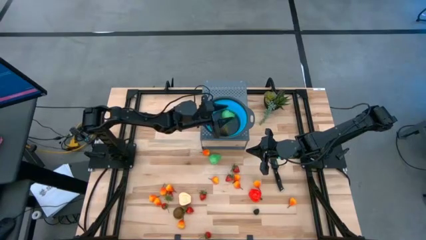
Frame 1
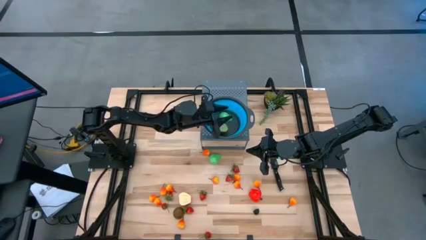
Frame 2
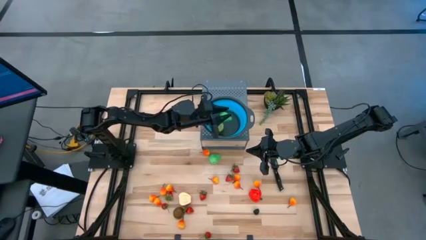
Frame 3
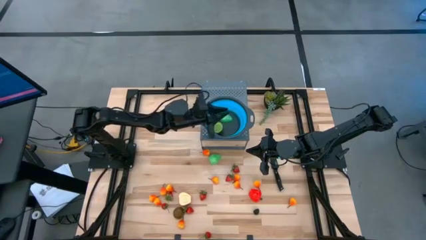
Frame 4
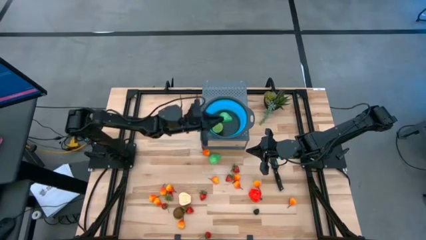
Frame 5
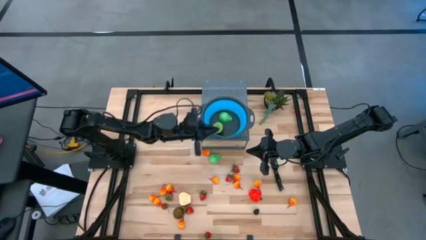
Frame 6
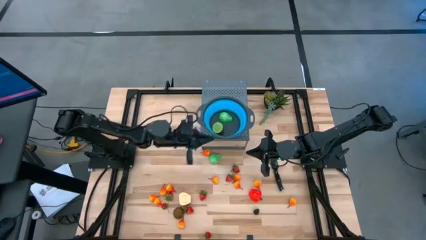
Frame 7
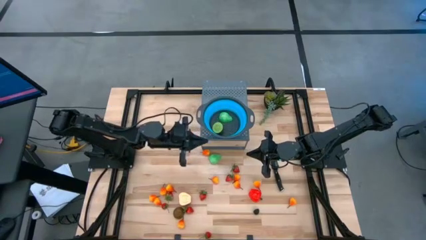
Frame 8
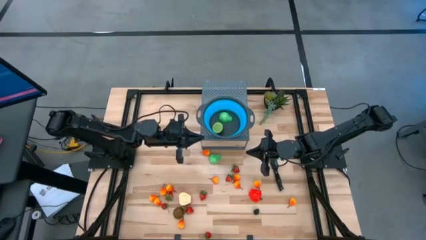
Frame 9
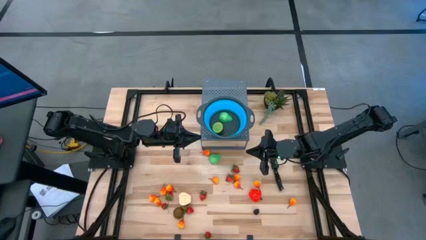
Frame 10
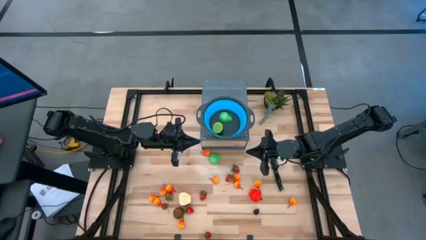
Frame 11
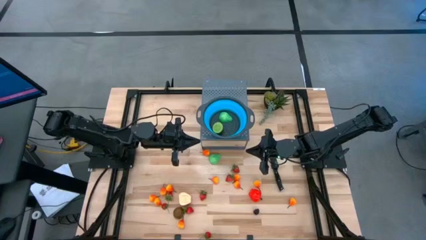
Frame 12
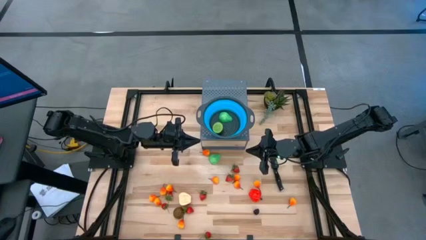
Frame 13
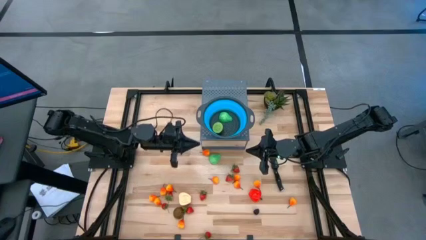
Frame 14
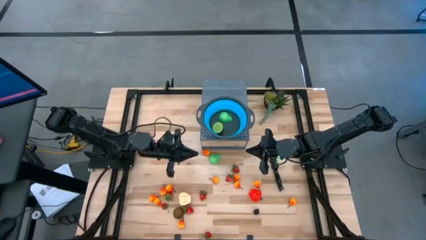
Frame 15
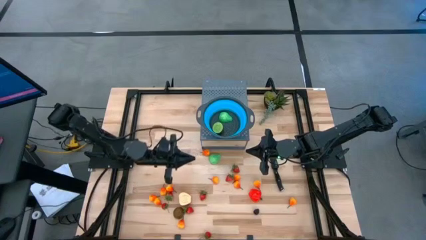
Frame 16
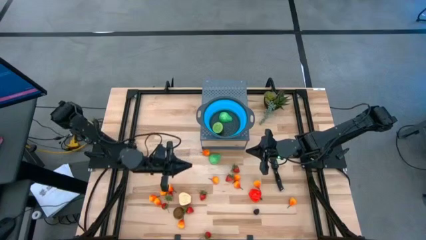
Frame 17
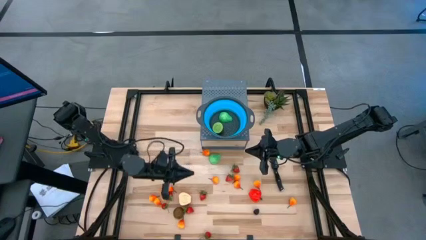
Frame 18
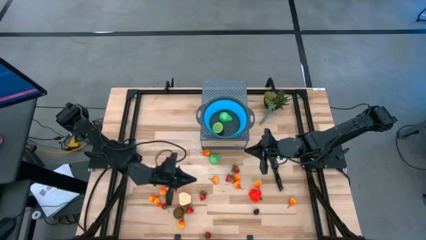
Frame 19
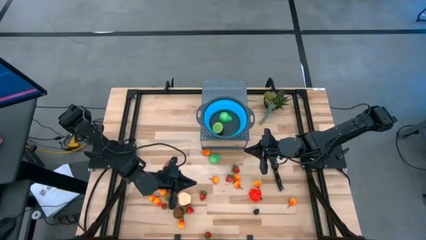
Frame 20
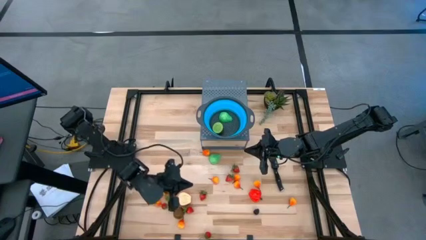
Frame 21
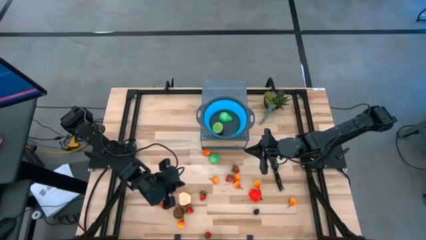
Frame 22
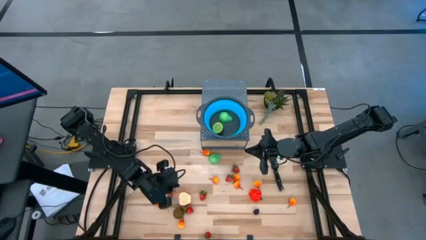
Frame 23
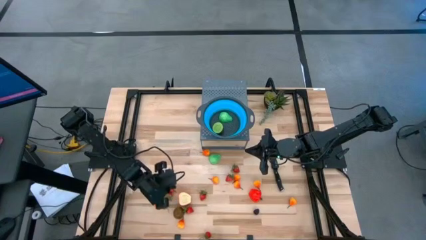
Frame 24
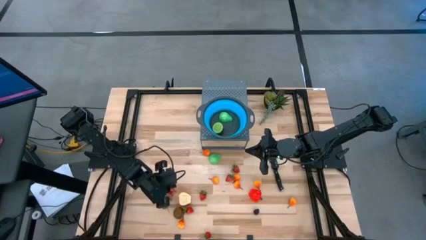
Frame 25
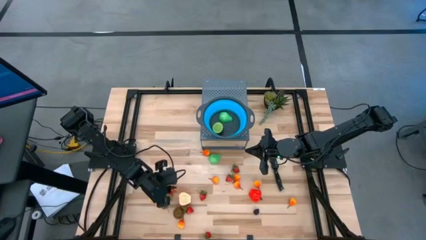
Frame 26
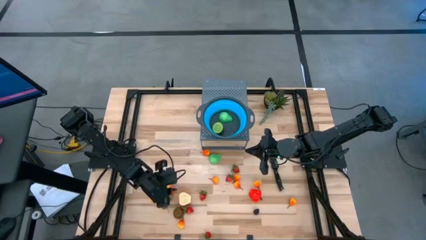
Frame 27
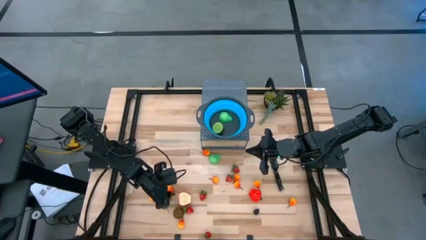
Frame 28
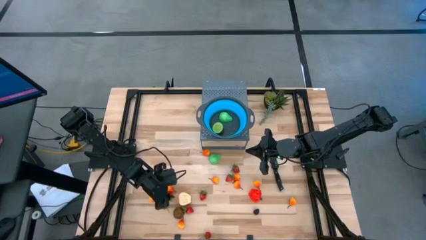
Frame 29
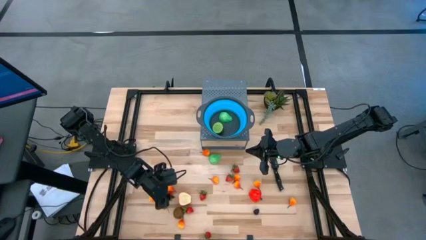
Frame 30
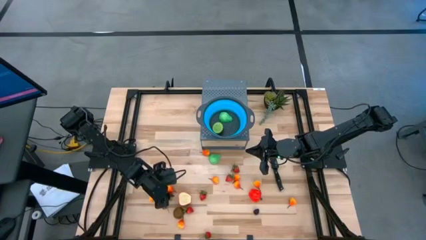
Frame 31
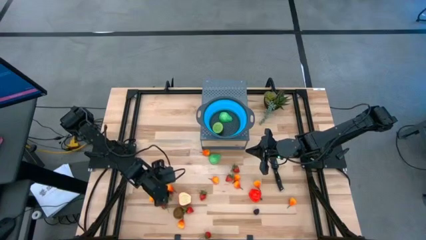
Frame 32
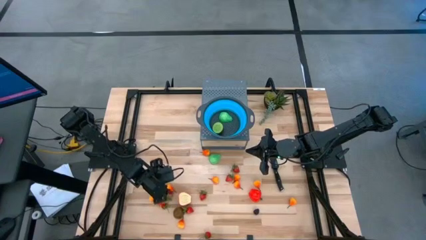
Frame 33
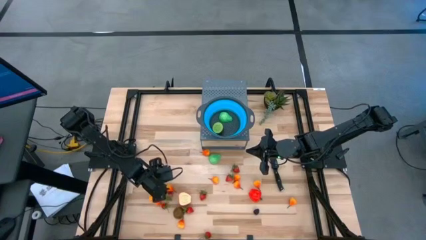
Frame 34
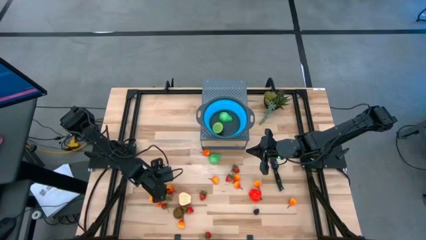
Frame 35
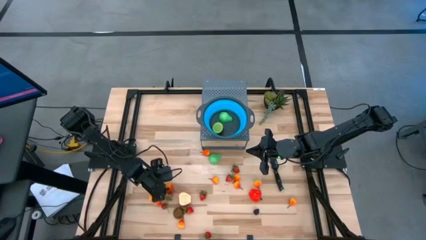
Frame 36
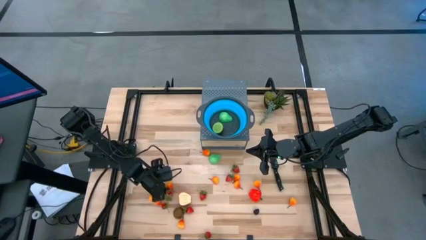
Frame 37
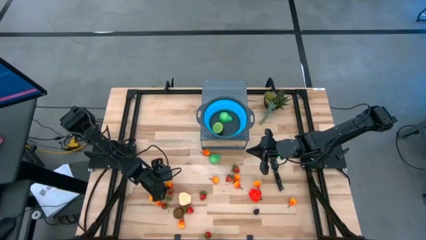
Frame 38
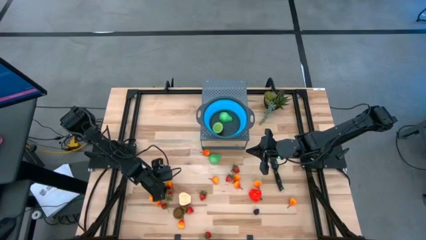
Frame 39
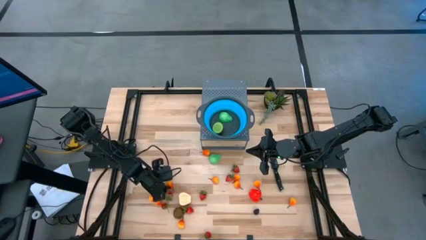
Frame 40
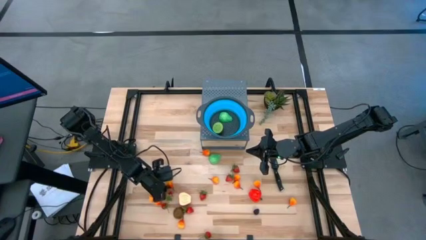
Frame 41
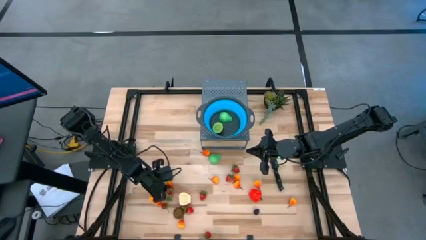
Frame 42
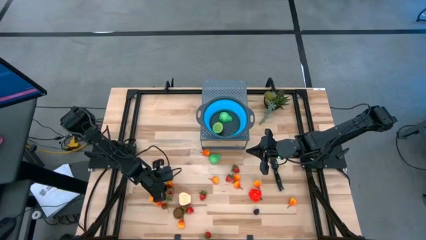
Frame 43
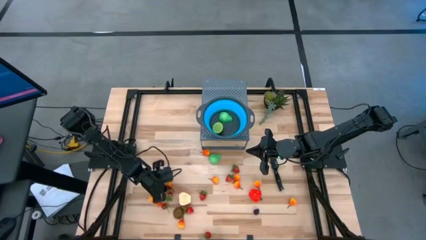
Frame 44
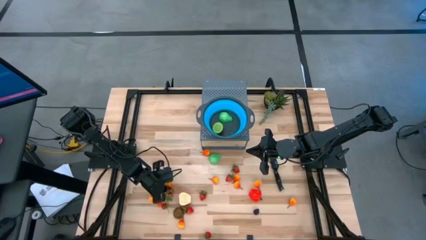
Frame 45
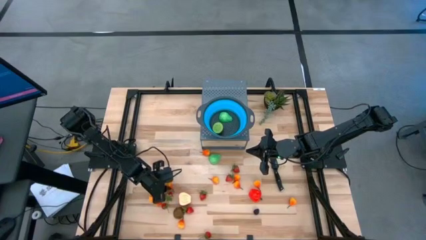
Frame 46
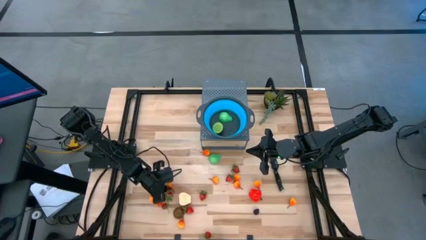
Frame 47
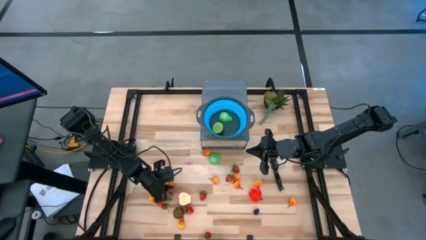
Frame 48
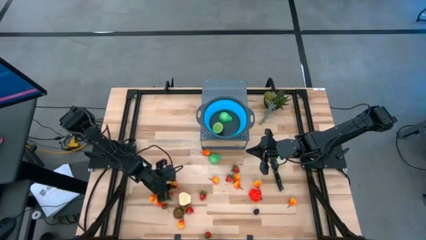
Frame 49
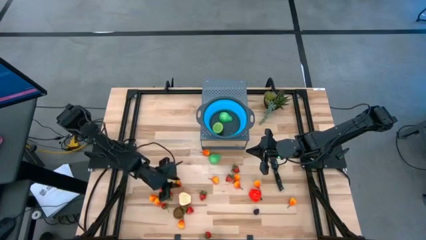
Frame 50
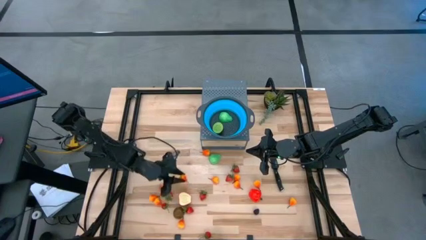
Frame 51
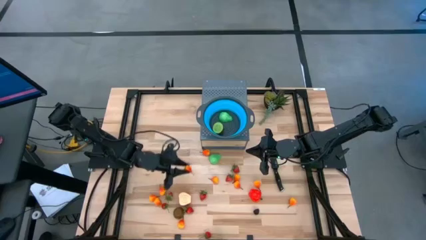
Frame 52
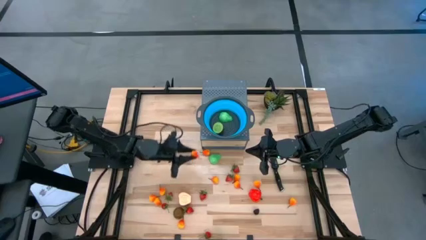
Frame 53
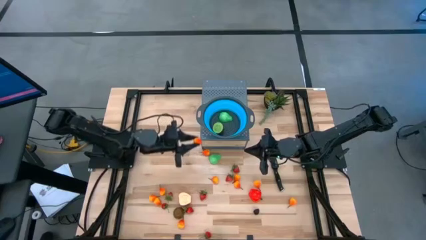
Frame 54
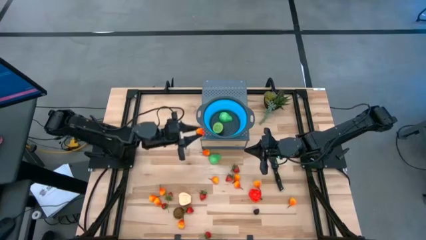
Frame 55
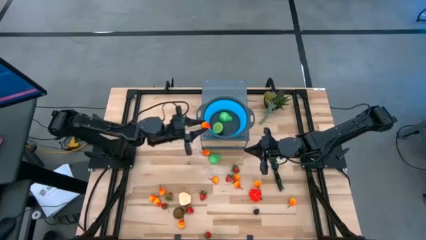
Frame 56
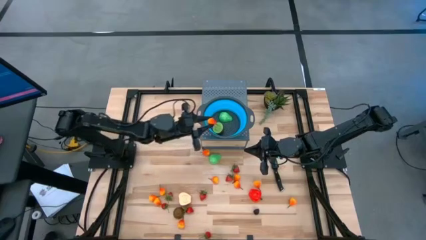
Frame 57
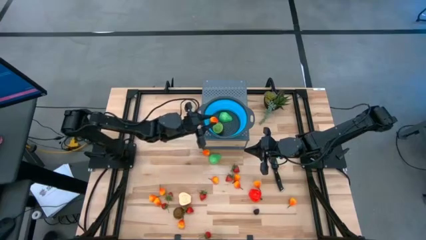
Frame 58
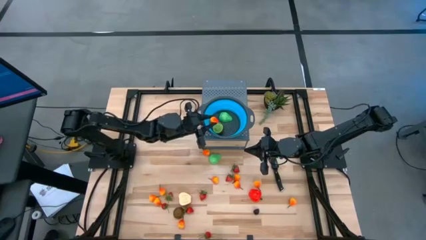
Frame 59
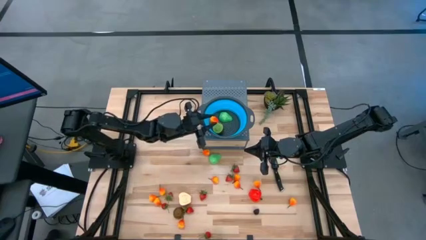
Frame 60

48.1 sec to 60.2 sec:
Task: Pick & Place Fruit
Put the peach into the strainer bowl
